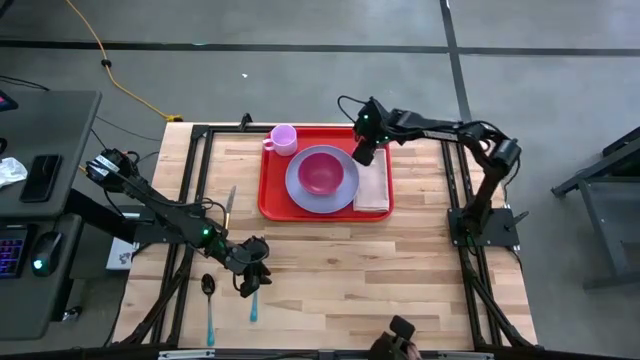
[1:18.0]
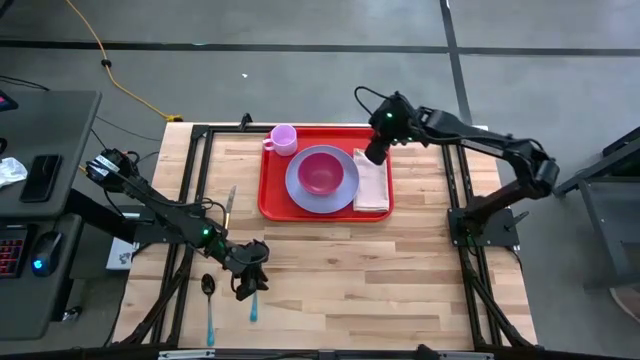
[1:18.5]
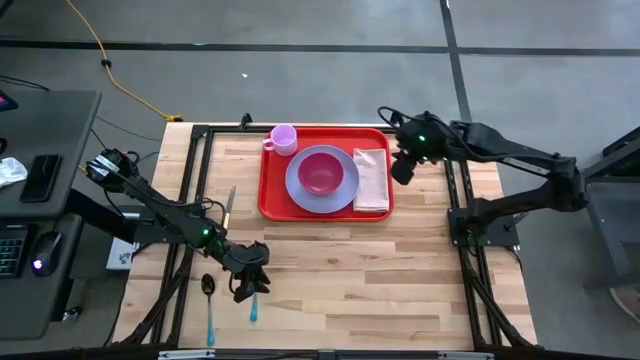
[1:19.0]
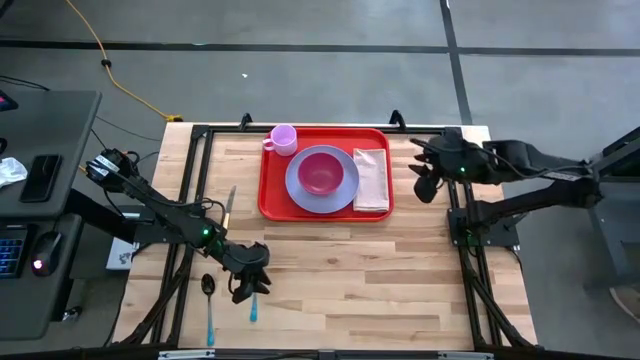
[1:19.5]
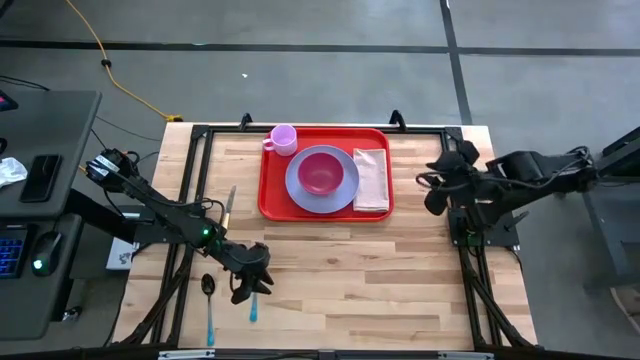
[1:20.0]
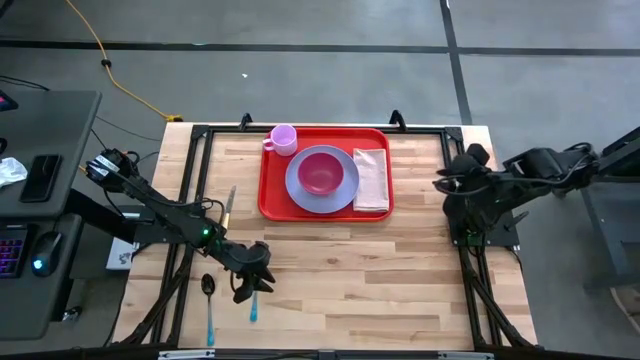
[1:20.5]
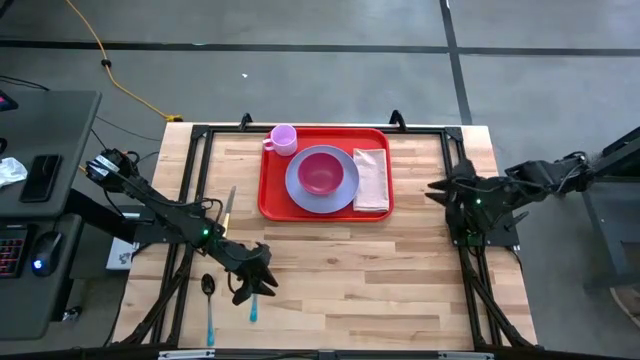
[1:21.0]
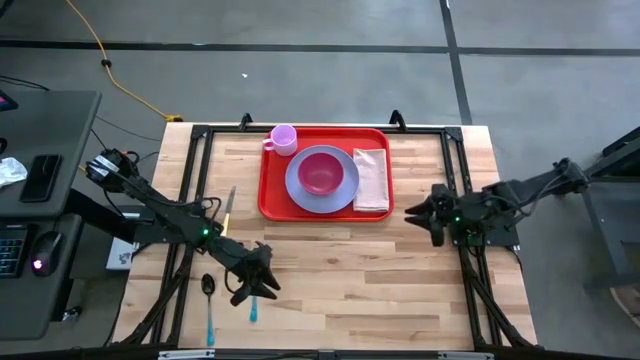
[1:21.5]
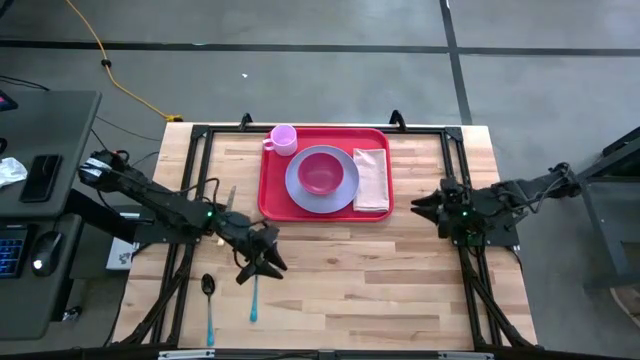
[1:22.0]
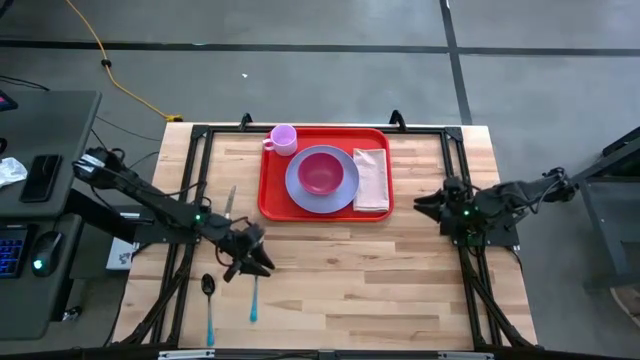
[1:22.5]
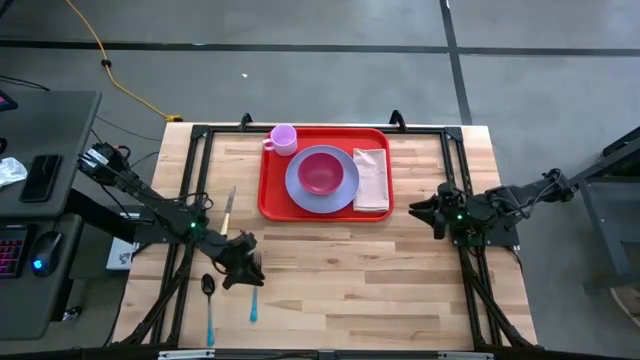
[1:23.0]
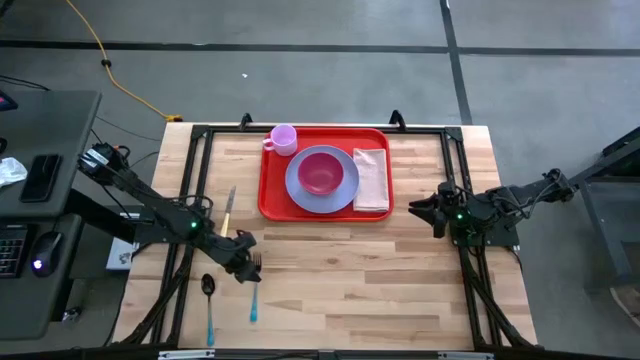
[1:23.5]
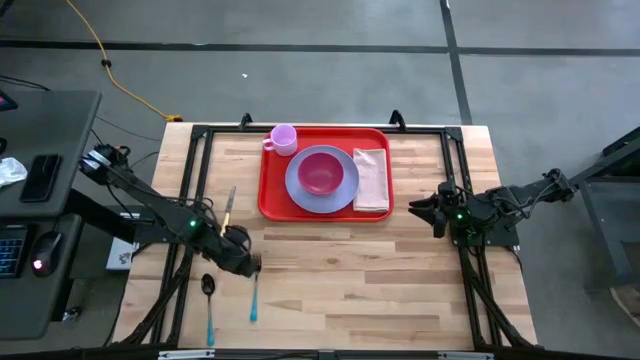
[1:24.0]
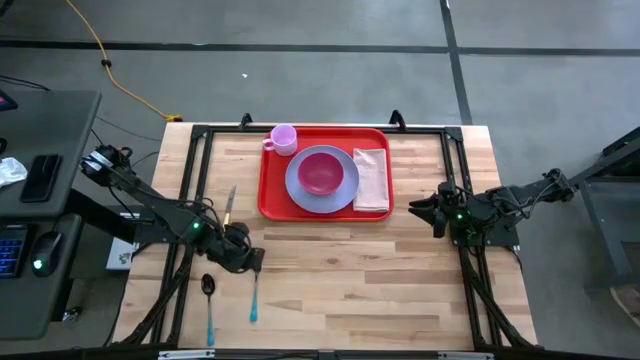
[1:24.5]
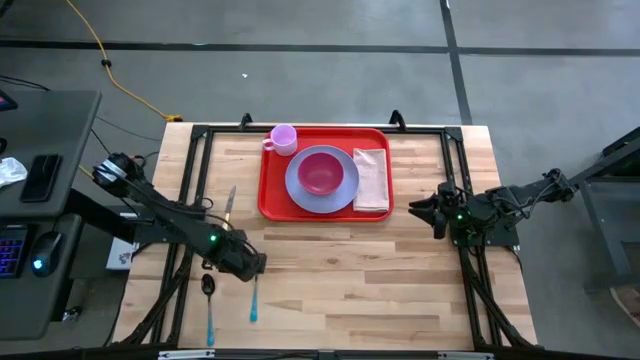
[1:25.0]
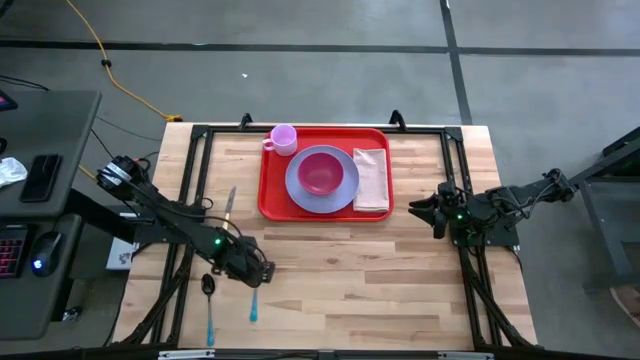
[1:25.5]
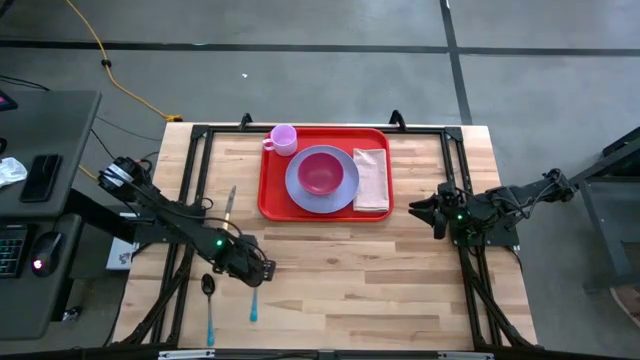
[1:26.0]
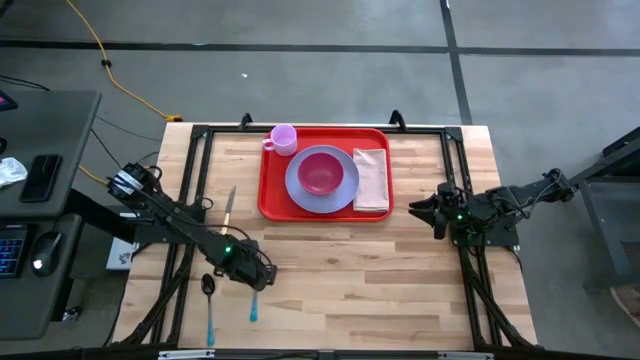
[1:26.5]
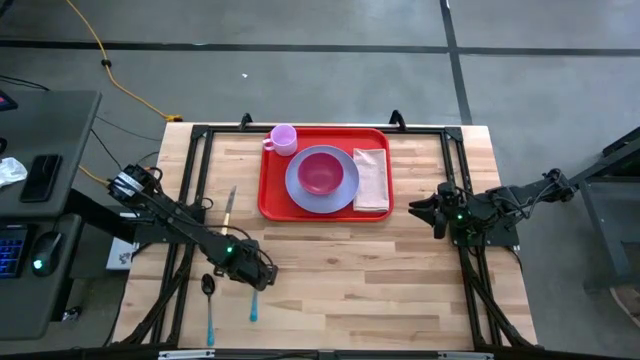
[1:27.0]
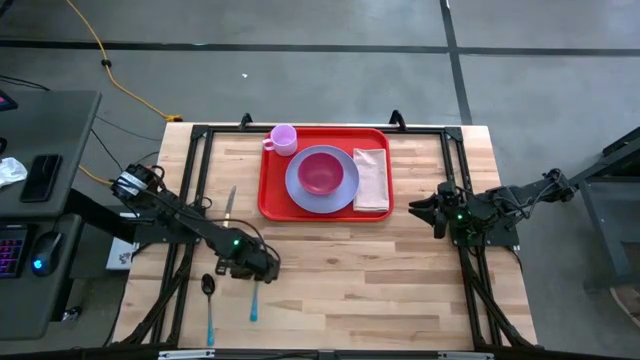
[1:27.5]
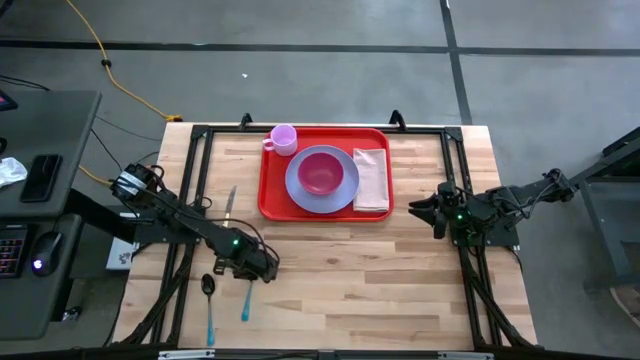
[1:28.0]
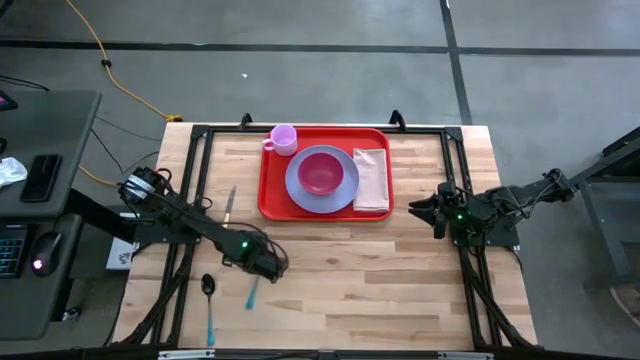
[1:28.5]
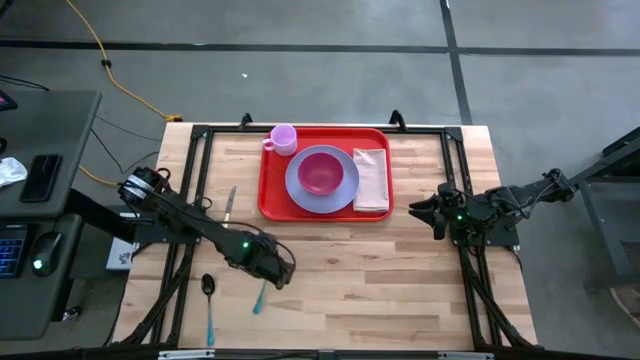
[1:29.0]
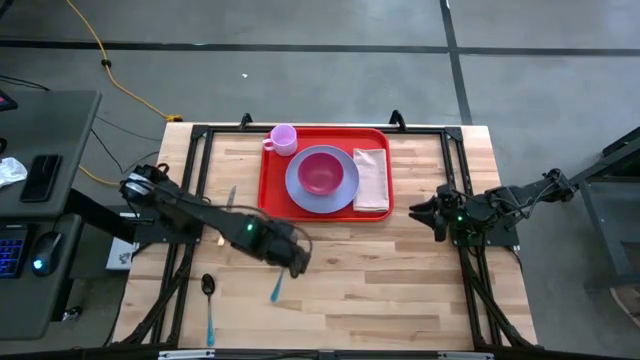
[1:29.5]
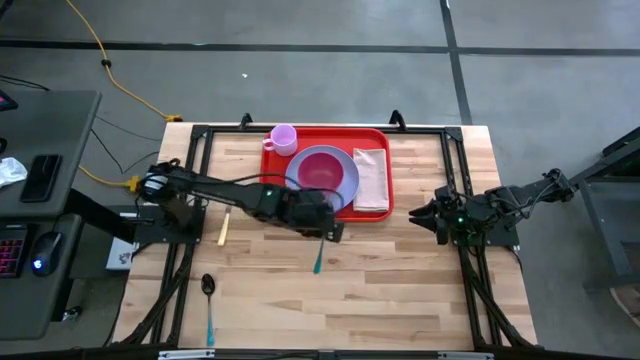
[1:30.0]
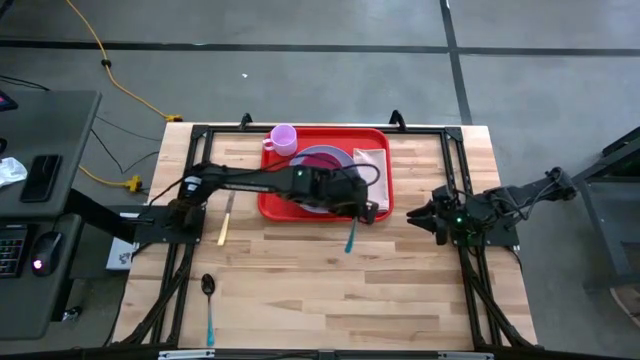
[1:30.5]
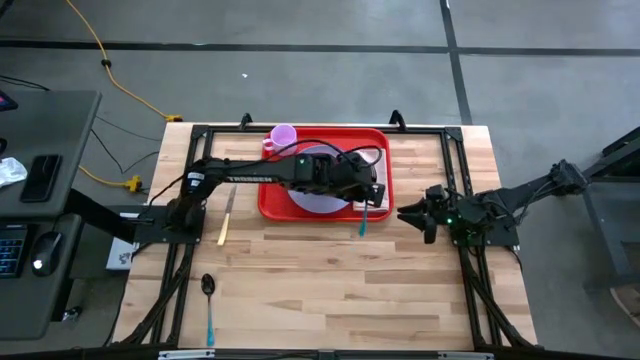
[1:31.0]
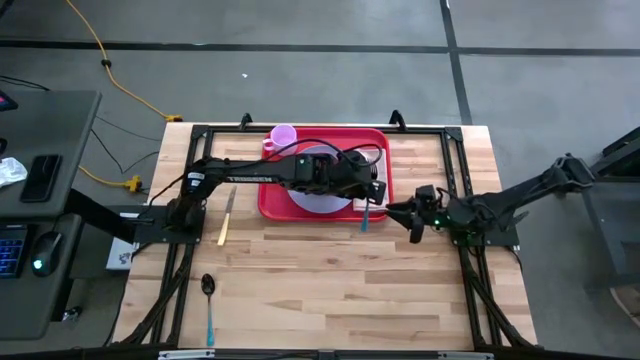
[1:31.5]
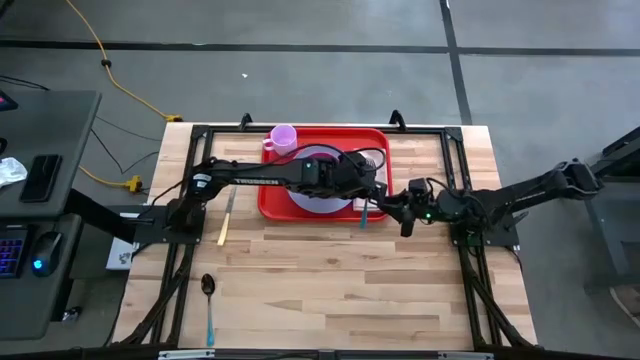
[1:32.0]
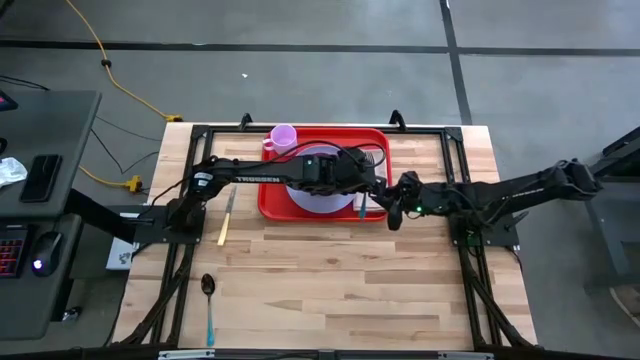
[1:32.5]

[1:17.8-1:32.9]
Task: Set up tray
Put the blue fork on the brown napkin on the orange serving tray

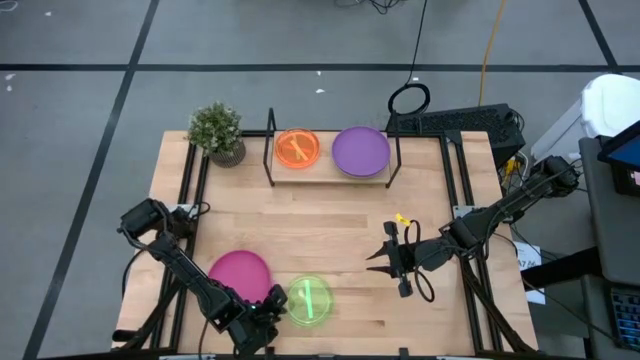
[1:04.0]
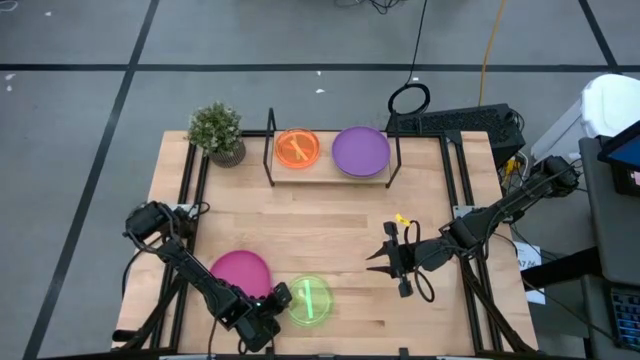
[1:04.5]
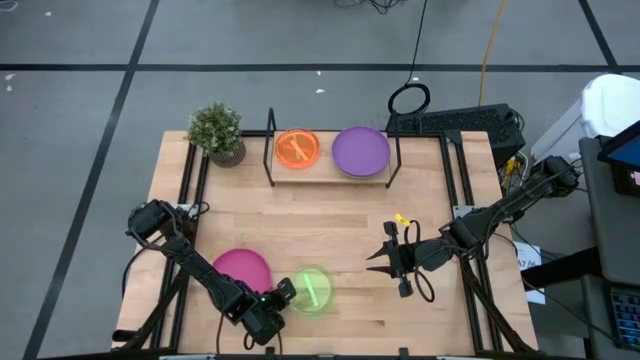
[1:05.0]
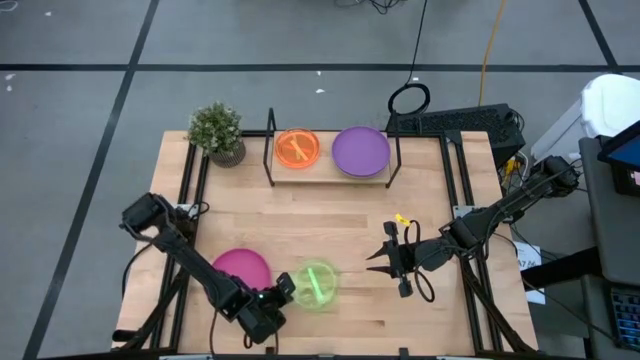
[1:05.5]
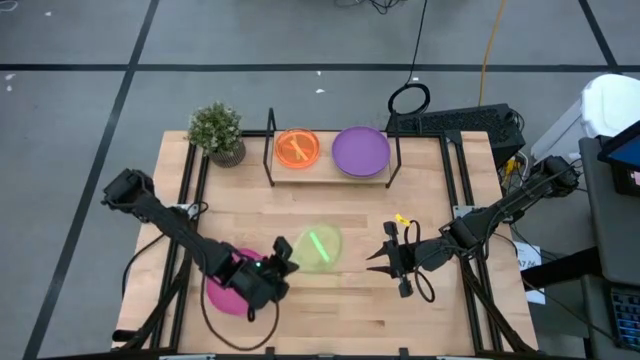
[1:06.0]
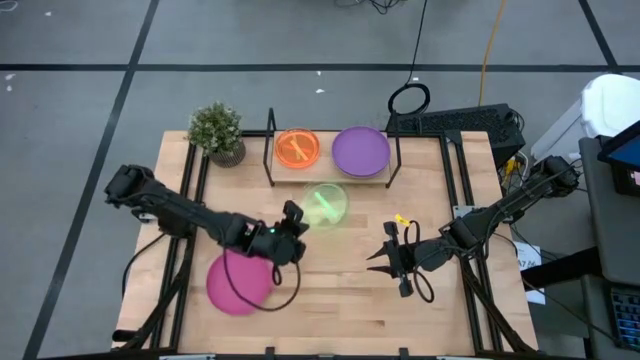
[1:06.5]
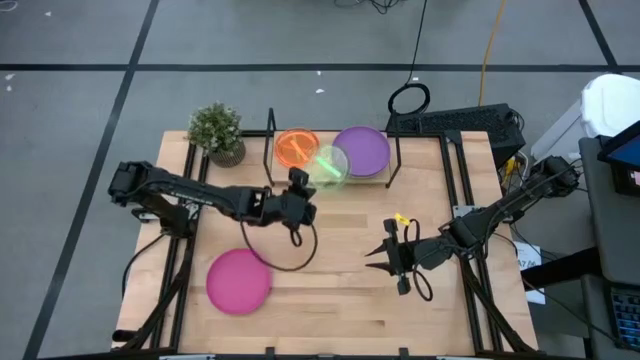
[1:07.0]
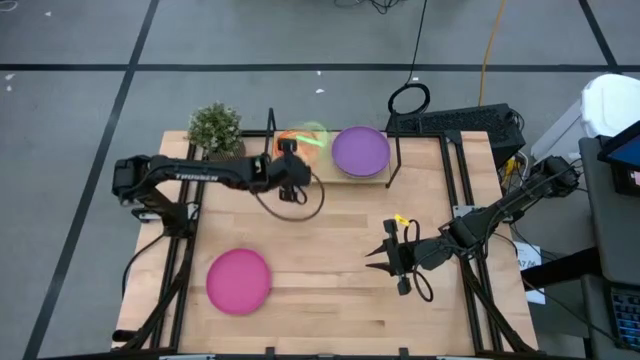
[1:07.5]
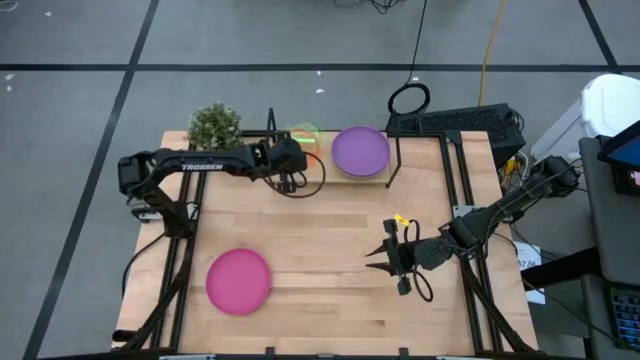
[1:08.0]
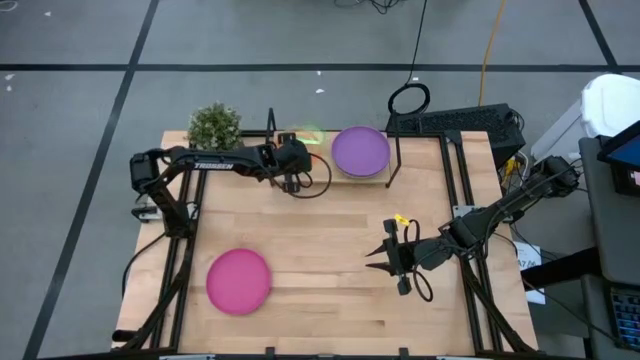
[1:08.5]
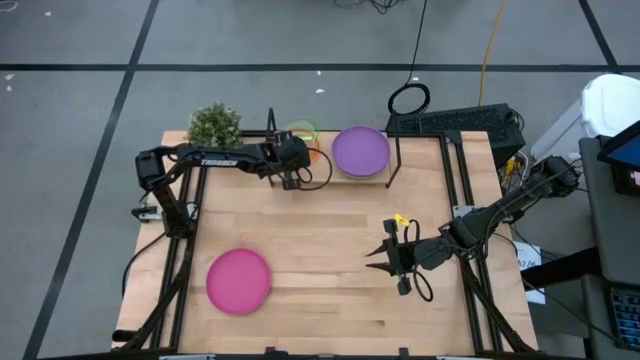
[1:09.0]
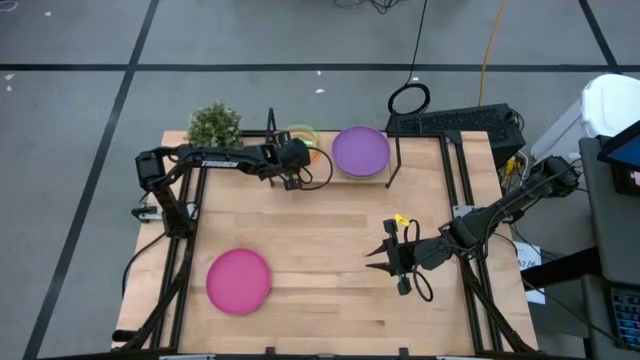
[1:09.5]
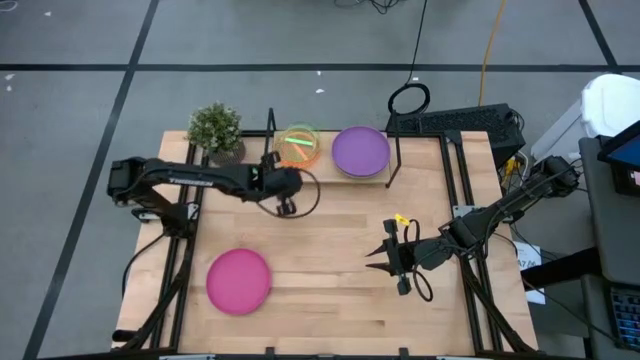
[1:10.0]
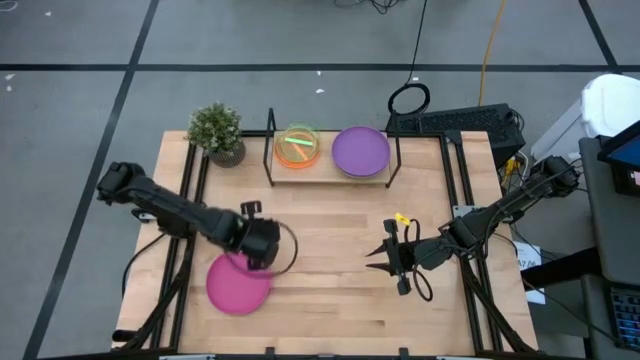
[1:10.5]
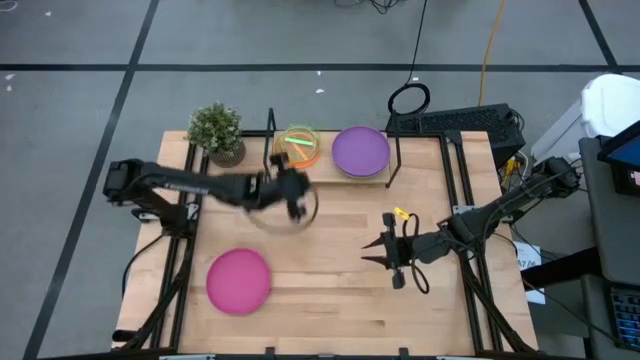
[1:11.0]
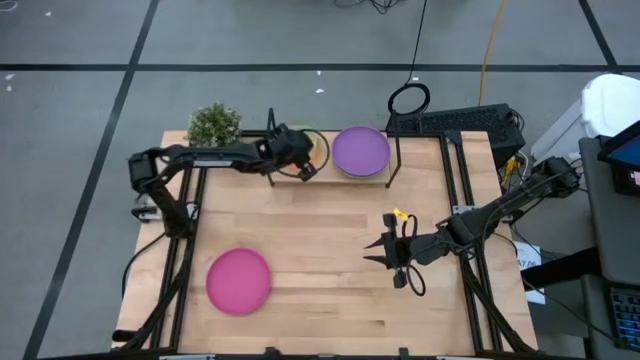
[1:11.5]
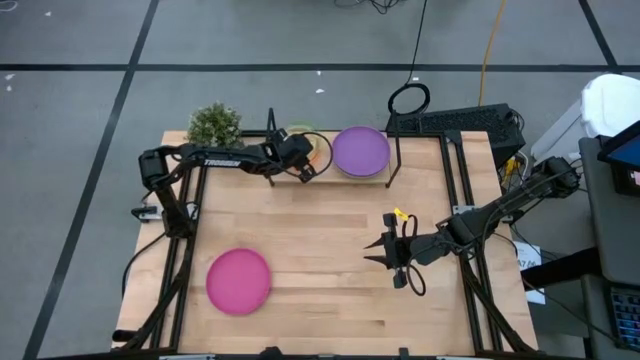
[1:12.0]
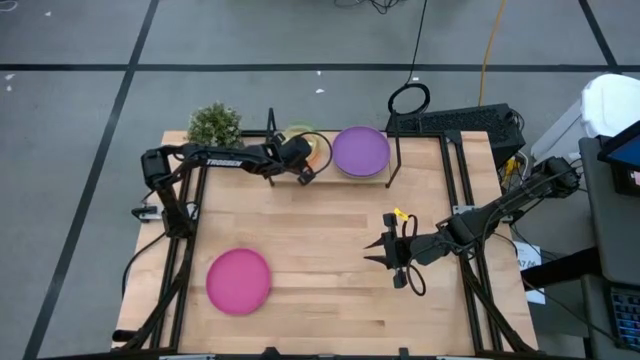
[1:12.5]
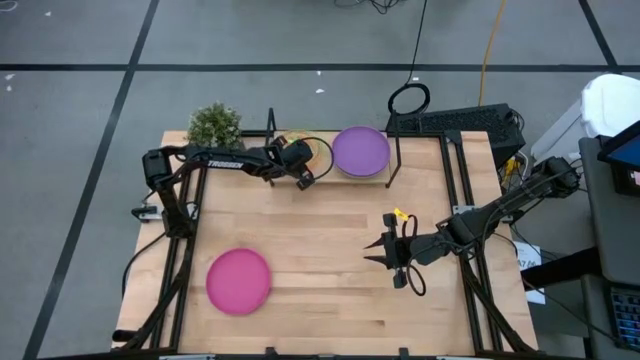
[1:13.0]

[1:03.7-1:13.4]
Task: Place and stack plates onto a shelf
Stack the transparent green plate on top of the transparent orange plate
